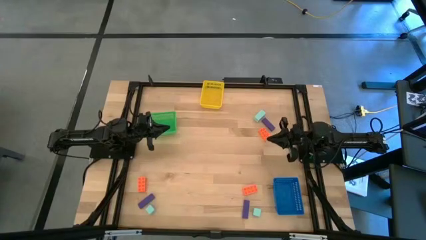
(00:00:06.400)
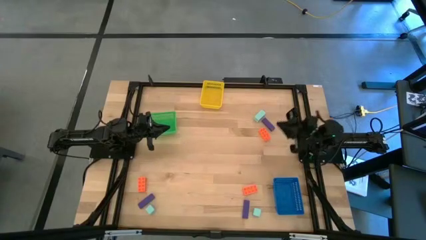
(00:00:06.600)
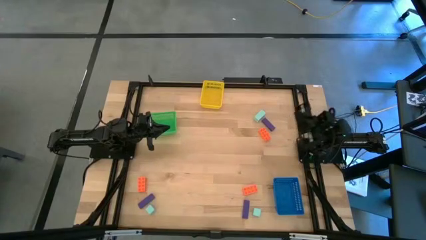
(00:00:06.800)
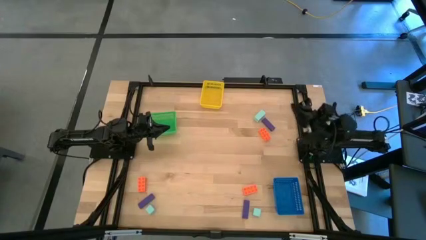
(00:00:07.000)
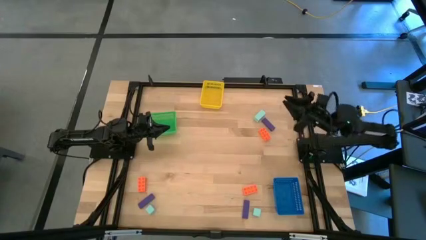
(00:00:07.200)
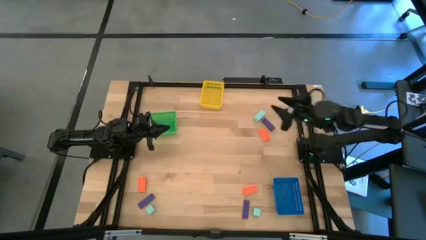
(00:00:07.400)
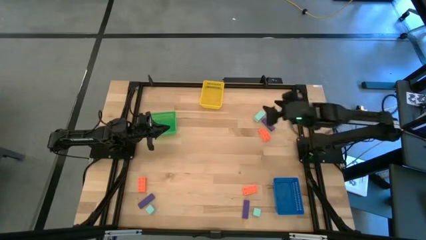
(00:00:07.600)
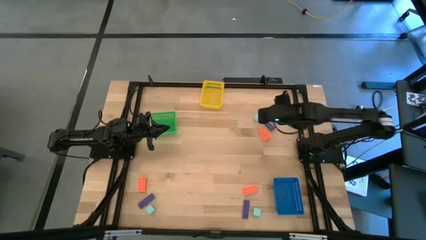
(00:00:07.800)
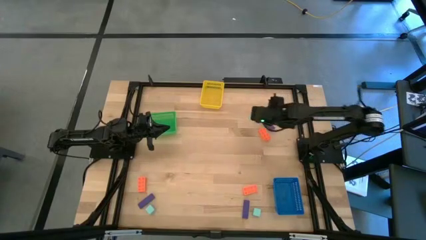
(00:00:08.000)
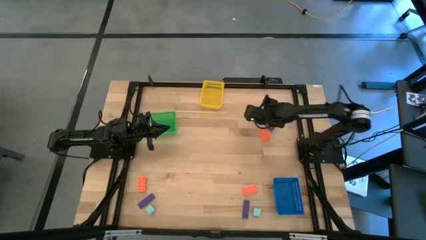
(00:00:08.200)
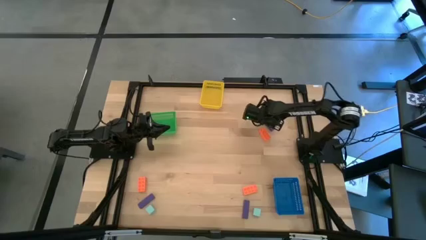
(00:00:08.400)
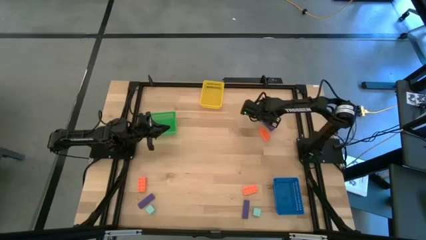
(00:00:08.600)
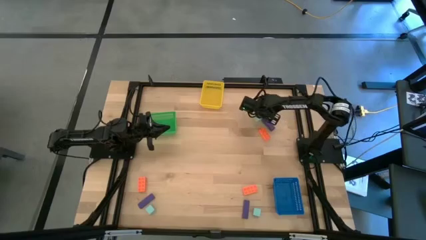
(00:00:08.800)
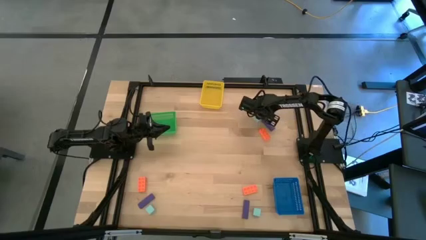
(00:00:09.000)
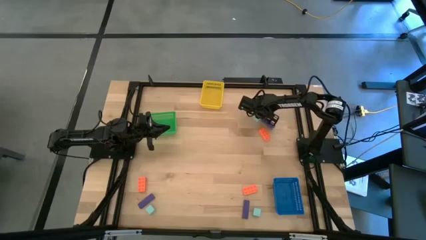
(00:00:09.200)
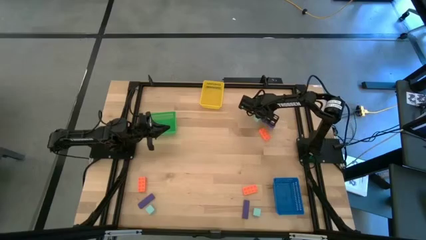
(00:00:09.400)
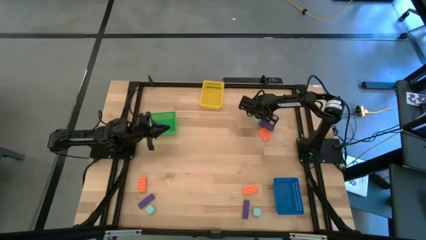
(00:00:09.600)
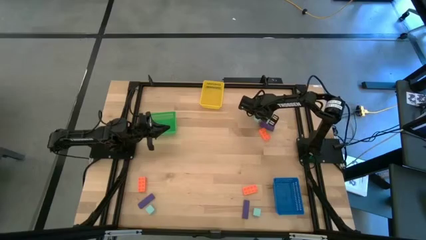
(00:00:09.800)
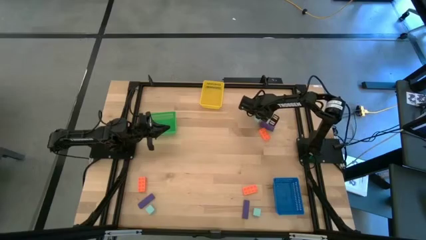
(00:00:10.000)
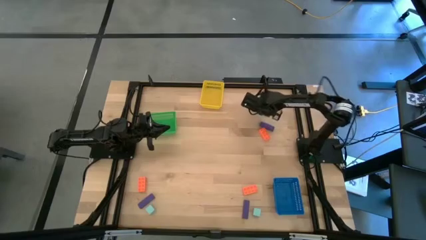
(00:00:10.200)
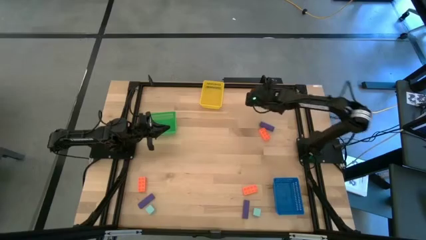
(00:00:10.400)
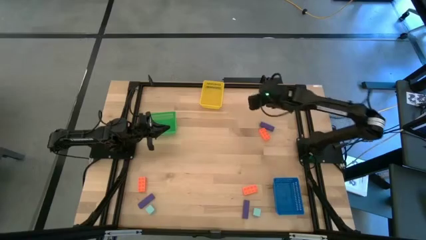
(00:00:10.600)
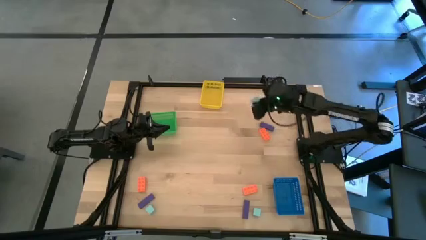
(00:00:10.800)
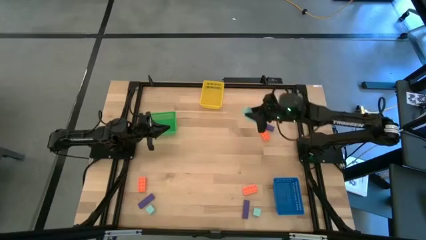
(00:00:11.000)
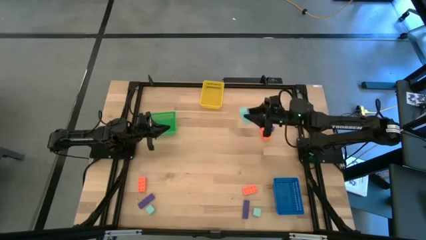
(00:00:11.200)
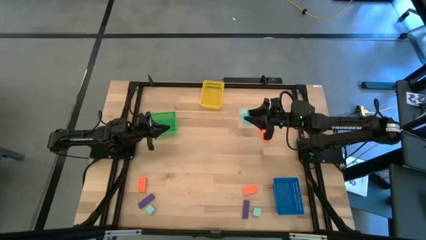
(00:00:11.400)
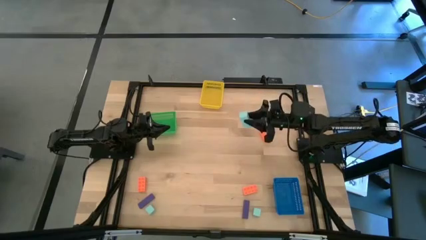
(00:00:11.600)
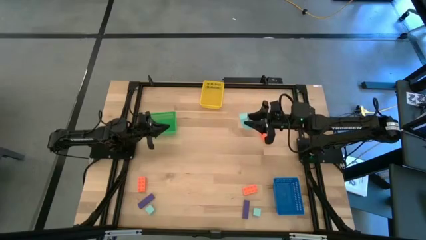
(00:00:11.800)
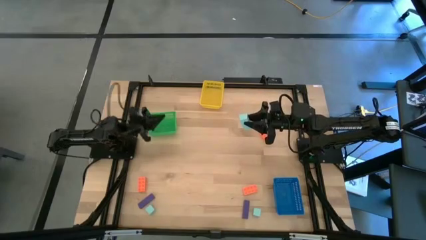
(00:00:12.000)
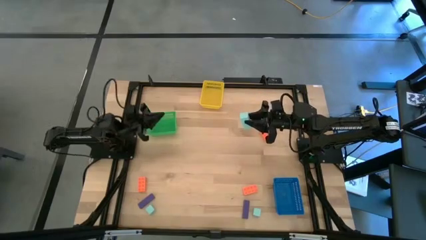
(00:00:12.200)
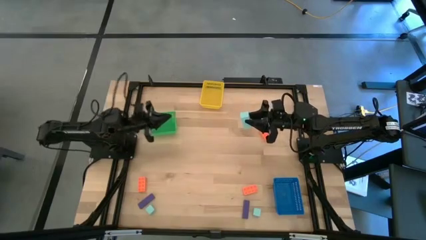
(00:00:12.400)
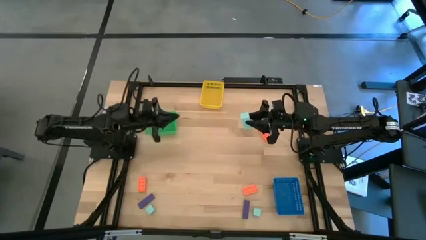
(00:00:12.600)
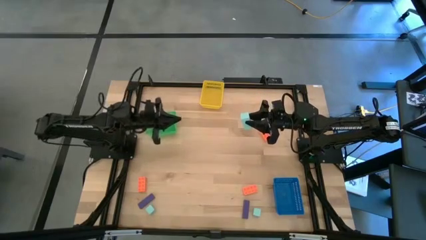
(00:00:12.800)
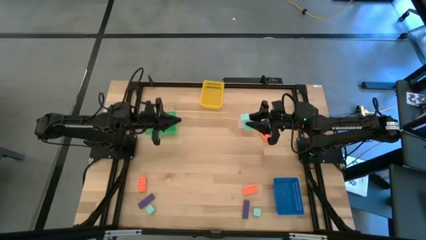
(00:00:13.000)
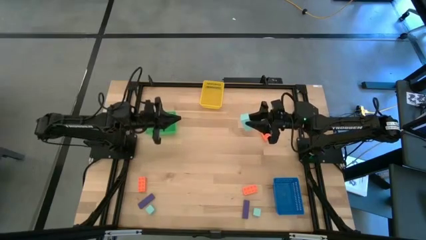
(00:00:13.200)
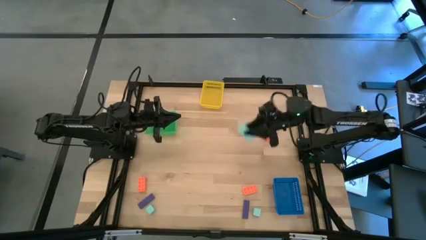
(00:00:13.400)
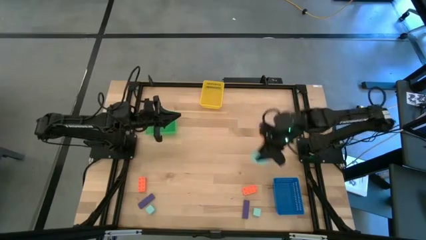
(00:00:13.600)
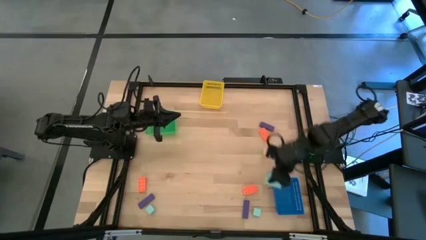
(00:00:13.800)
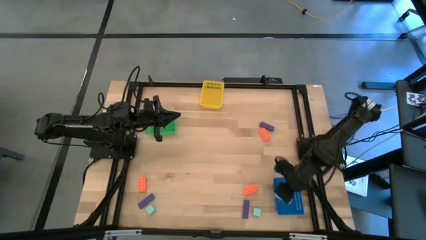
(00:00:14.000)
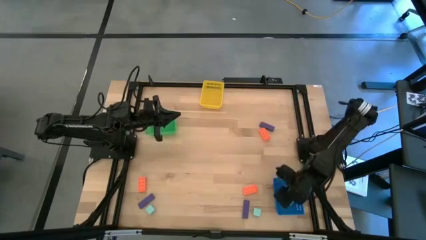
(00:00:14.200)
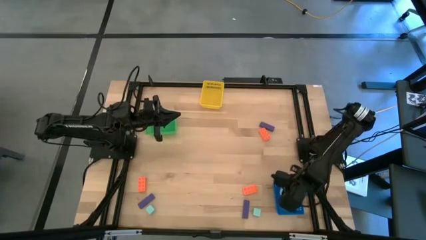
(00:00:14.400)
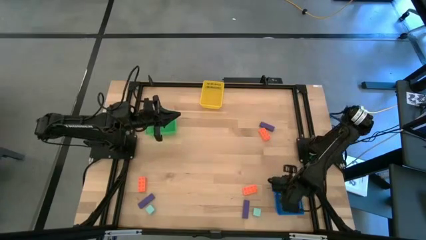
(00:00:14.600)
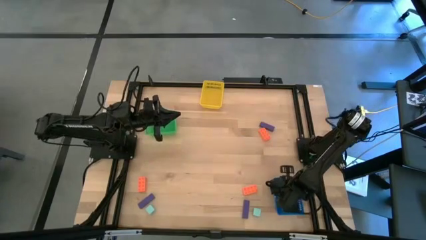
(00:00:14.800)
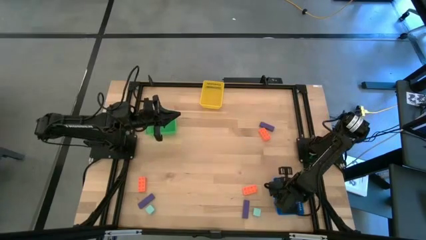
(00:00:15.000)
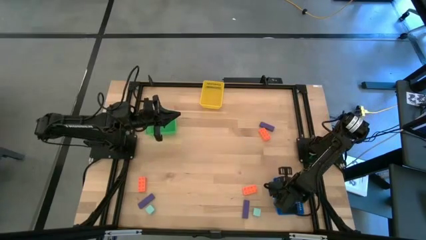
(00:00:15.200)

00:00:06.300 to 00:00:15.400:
Task: Sort & place blocks by color
Put the top right light blue block into the blue bin

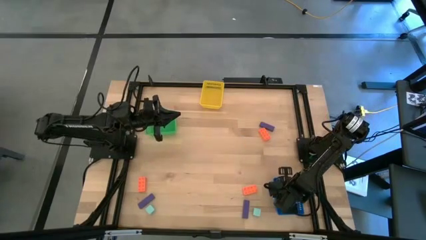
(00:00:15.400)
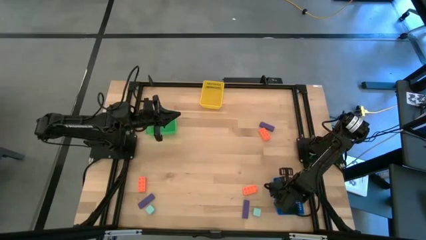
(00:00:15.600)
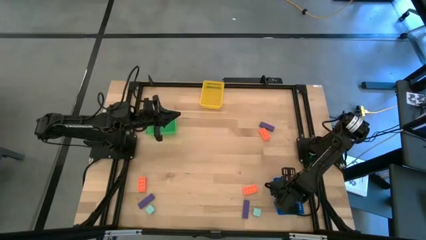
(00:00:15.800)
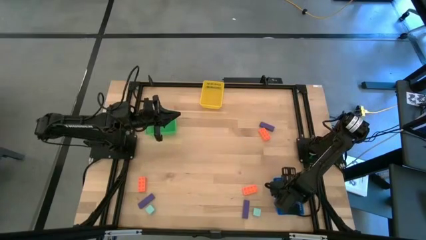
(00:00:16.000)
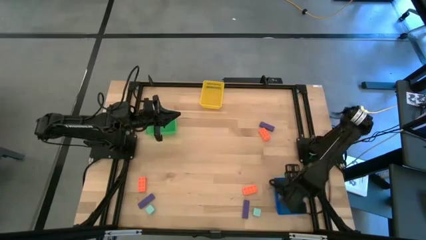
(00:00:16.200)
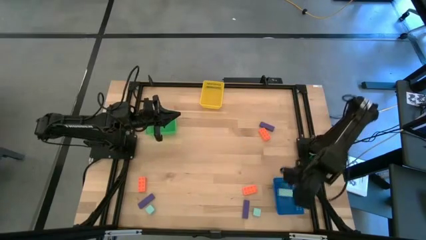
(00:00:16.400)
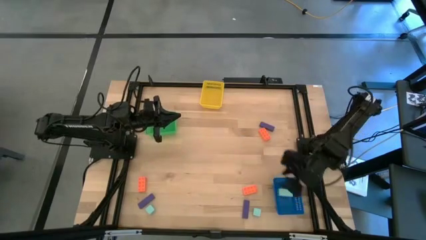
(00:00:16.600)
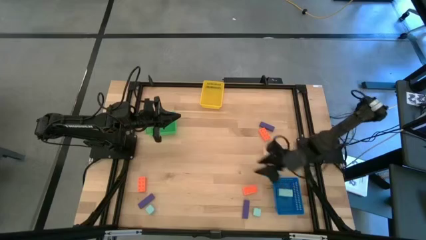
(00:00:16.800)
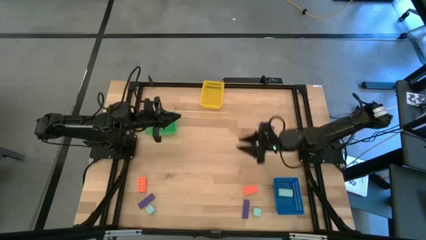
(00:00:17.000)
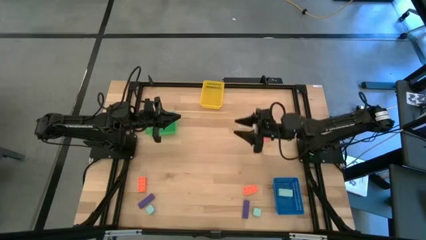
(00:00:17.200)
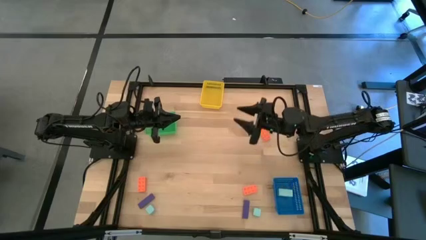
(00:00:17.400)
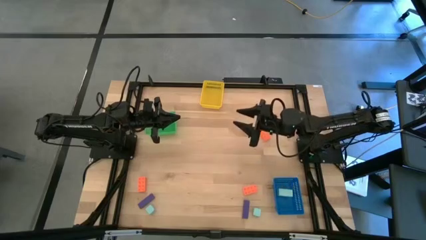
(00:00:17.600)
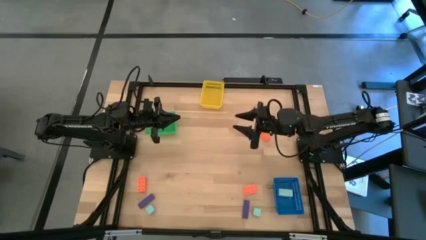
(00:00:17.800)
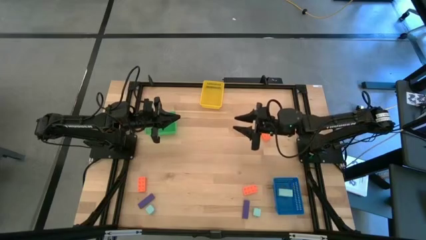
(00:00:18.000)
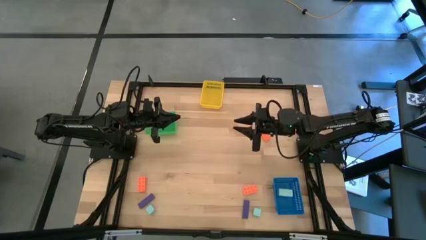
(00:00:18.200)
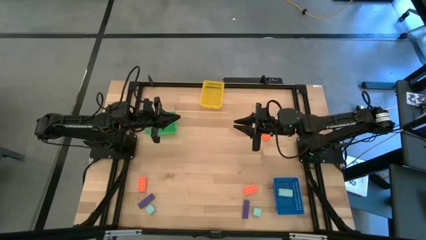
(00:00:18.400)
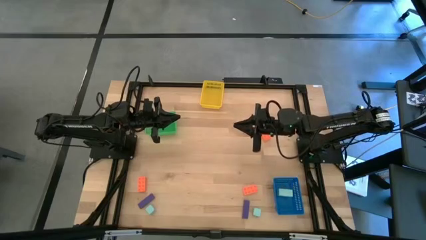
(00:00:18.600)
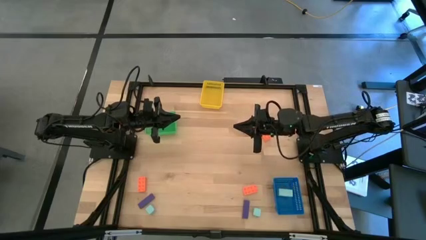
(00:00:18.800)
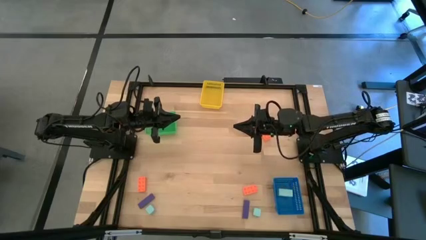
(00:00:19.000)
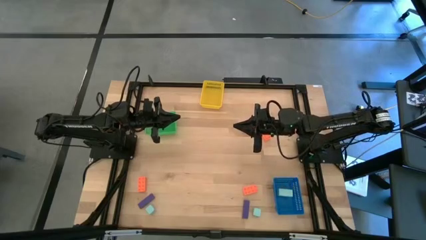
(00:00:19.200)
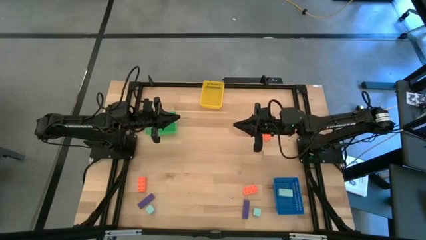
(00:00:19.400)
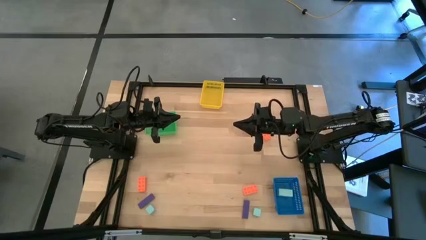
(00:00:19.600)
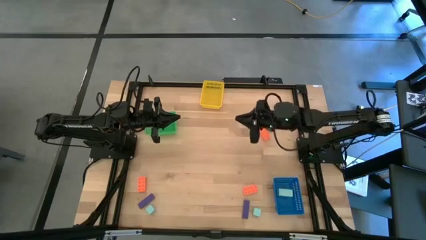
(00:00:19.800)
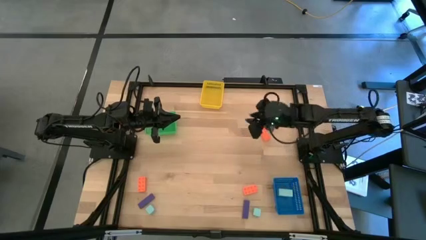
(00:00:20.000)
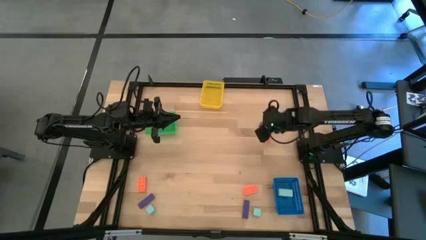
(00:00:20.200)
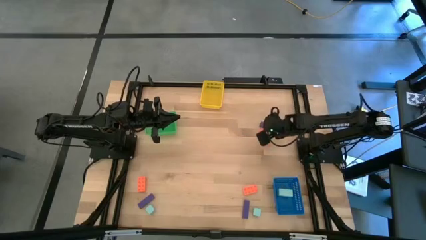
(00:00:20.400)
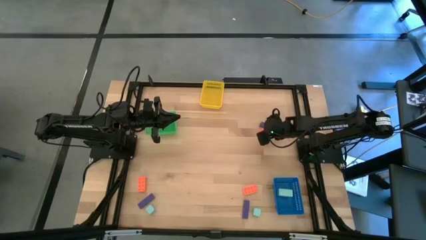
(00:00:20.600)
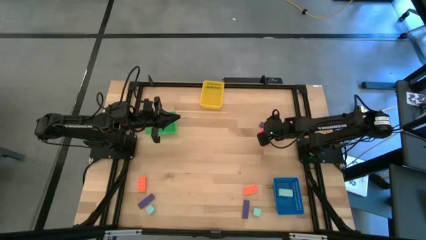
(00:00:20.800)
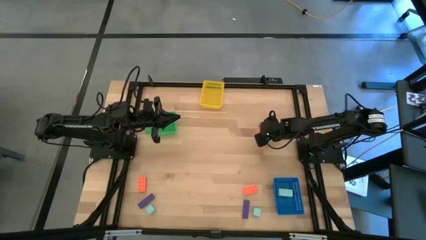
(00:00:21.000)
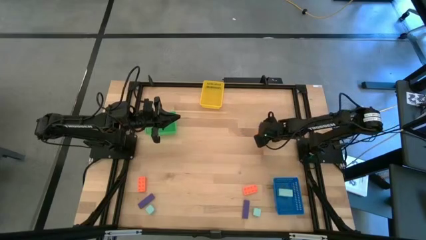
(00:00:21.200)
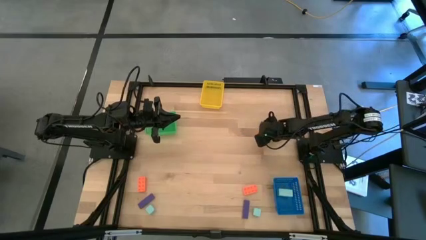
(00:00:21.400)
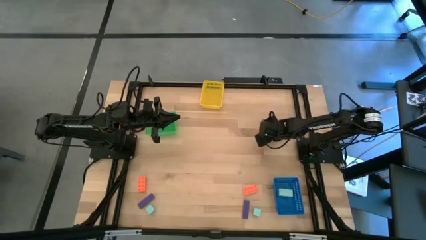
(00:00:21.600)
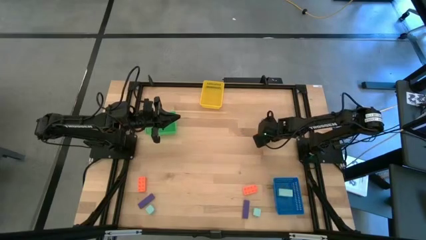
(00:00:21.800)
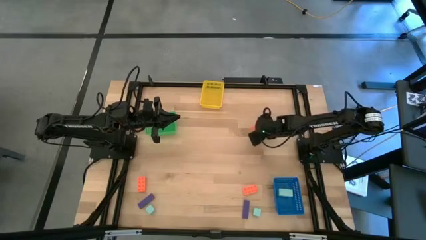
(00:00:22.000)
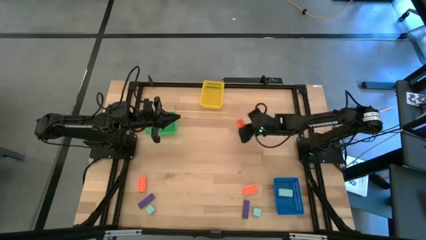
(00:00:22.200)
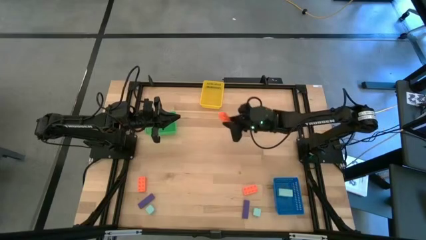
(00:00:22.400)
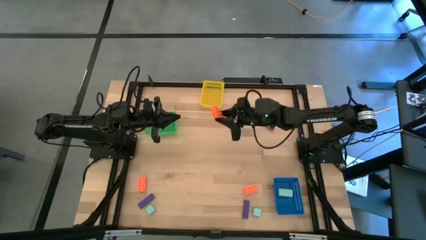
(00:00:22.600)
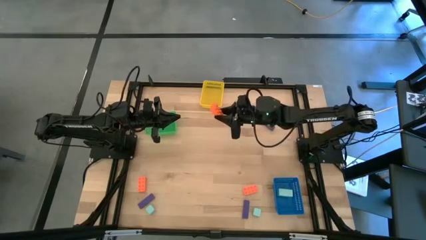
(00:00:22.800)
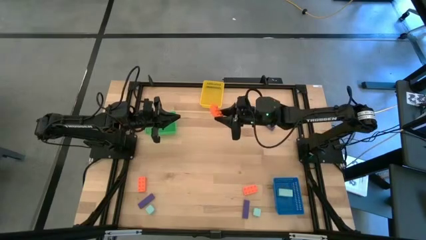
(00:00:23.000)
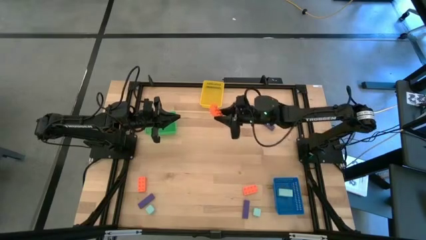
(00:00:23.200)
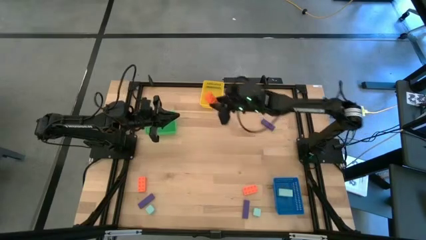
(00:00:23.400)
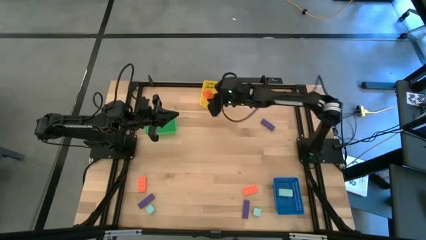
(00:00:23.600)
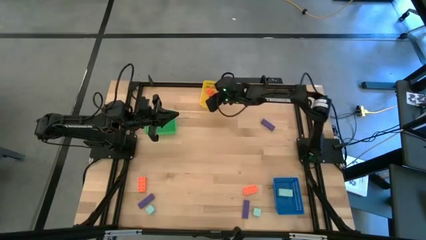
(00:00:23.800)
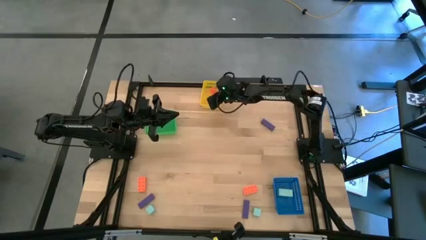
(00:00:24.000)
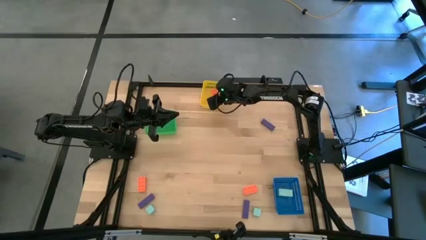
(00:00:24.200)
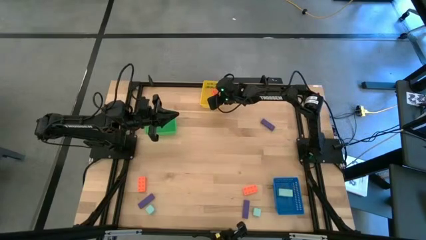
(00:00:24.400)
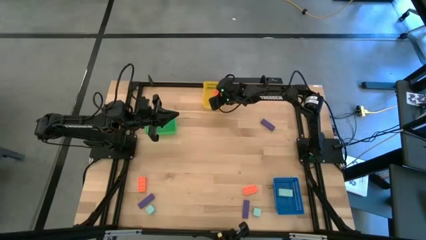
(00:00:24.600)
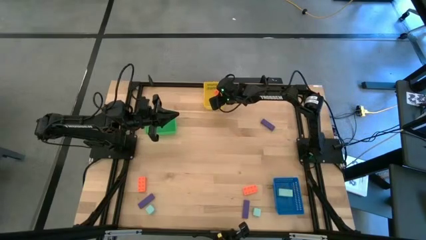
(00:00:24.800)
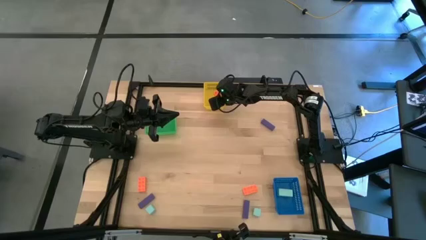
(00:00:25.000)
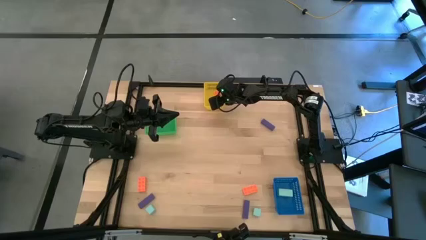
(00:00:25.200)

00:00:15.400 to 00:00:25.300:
Put the top right orange game piece into the yellow bin
